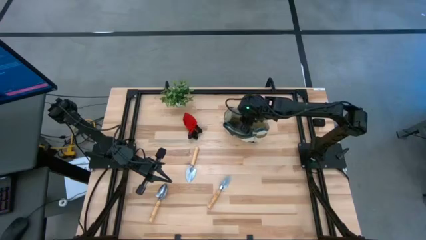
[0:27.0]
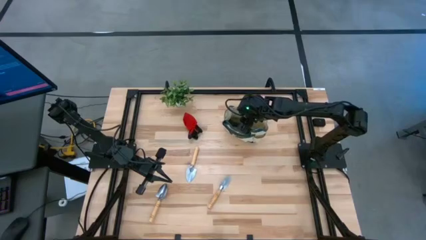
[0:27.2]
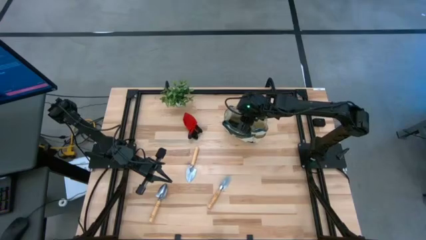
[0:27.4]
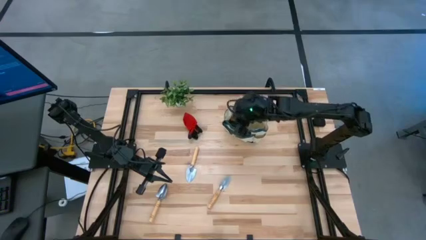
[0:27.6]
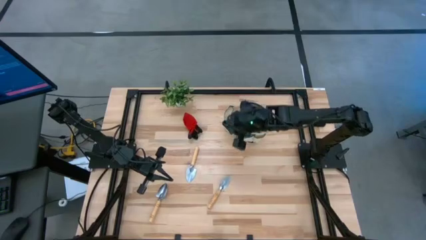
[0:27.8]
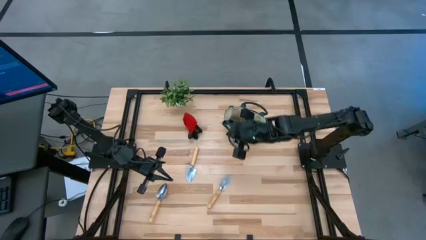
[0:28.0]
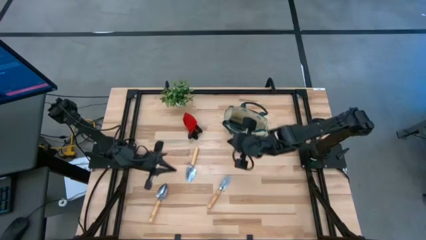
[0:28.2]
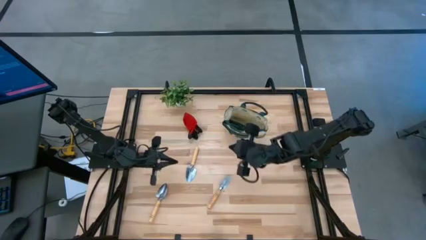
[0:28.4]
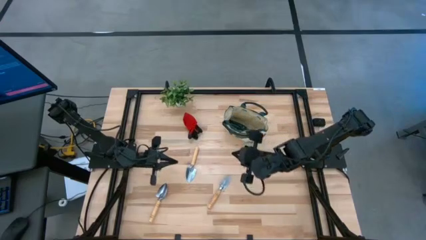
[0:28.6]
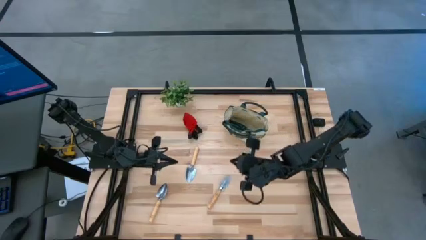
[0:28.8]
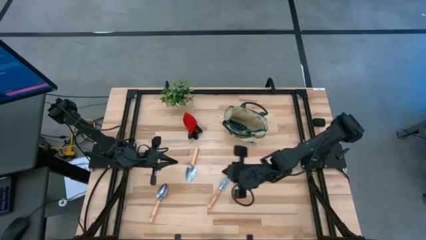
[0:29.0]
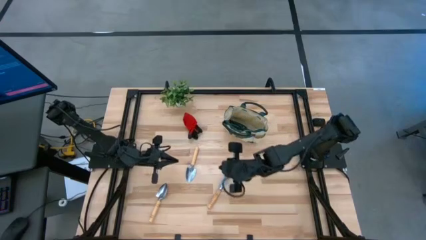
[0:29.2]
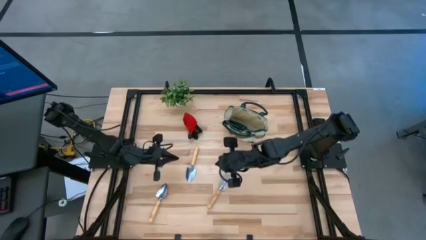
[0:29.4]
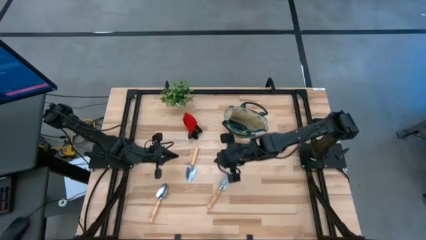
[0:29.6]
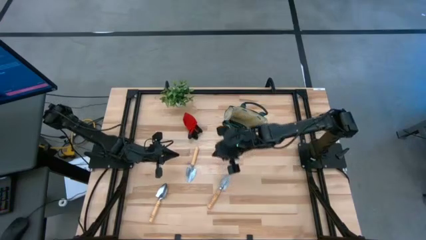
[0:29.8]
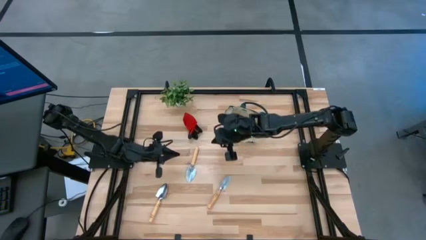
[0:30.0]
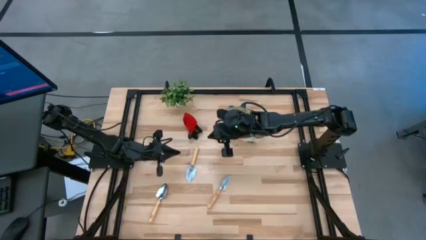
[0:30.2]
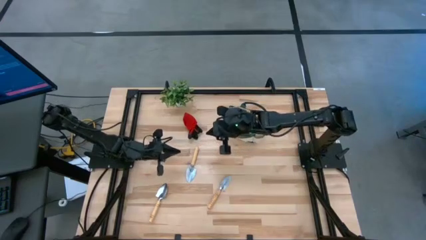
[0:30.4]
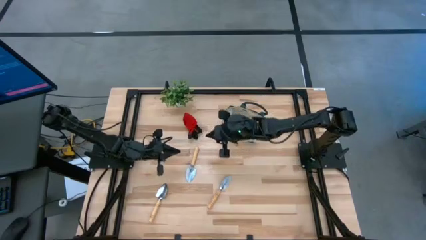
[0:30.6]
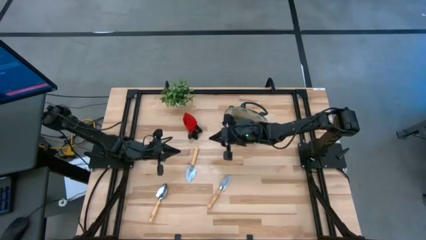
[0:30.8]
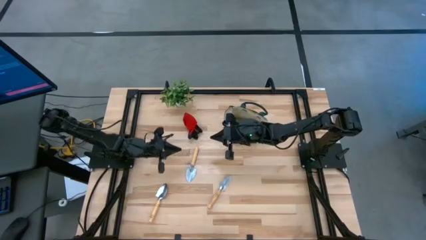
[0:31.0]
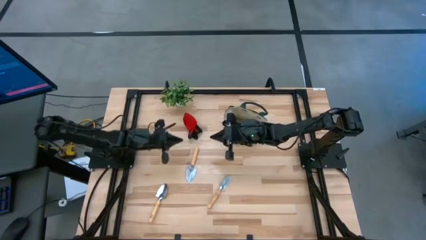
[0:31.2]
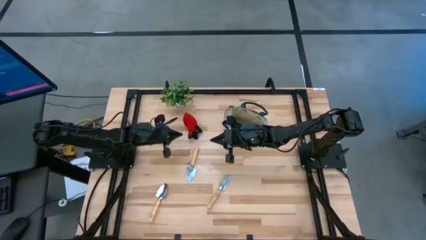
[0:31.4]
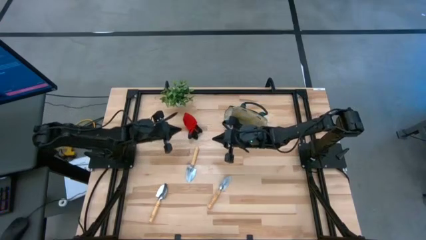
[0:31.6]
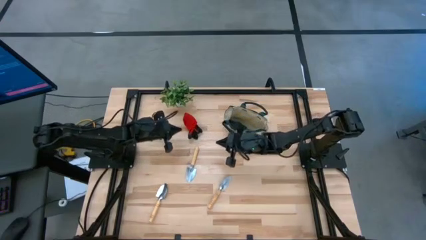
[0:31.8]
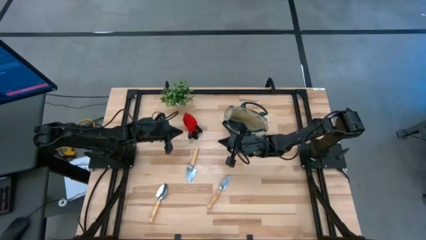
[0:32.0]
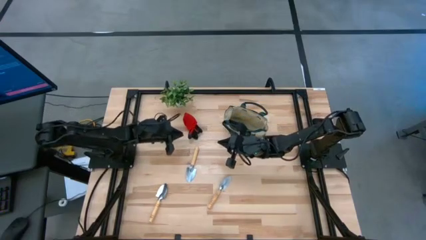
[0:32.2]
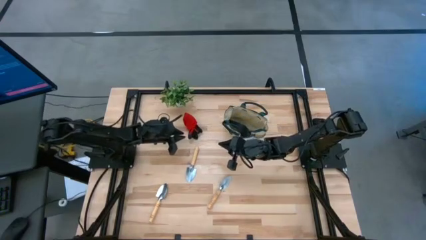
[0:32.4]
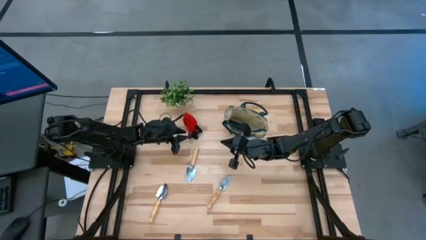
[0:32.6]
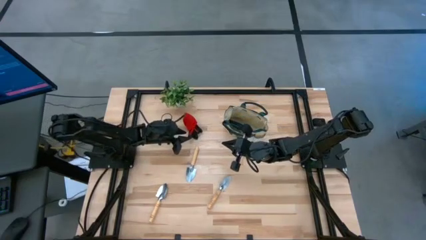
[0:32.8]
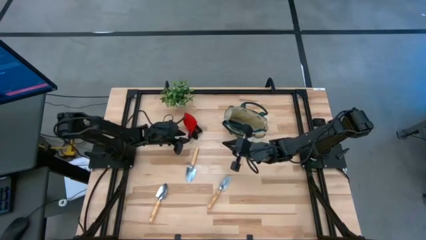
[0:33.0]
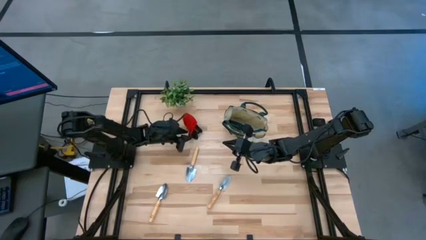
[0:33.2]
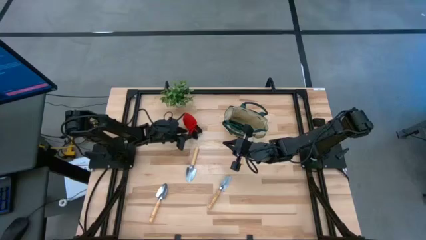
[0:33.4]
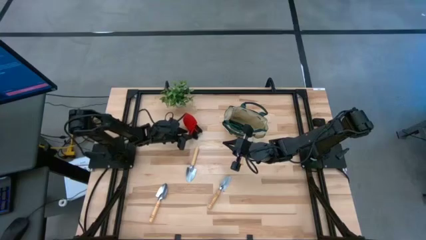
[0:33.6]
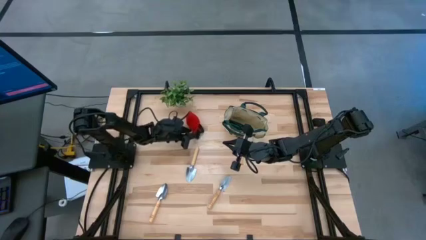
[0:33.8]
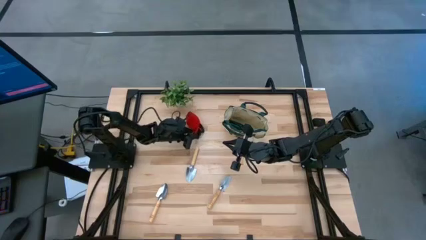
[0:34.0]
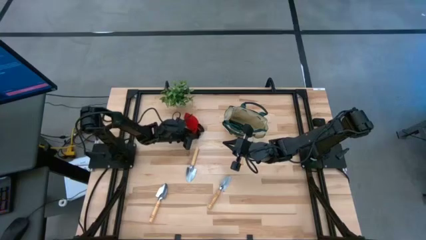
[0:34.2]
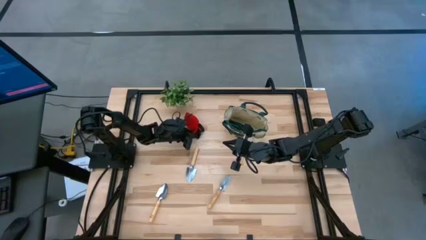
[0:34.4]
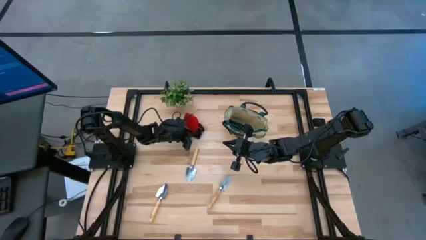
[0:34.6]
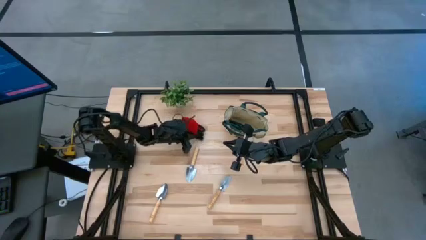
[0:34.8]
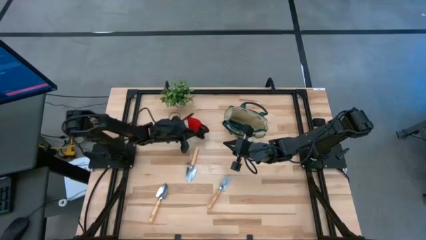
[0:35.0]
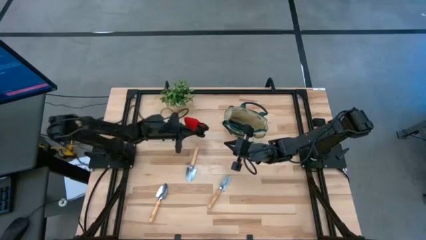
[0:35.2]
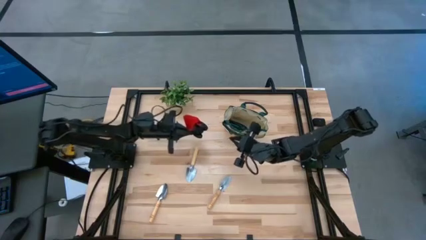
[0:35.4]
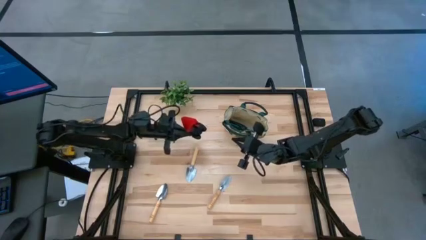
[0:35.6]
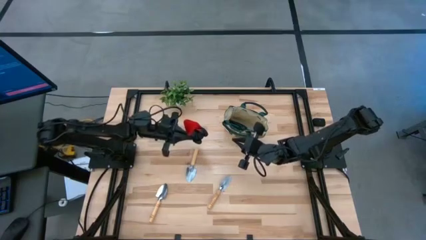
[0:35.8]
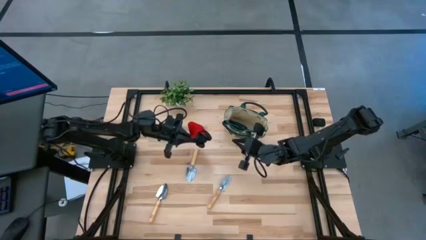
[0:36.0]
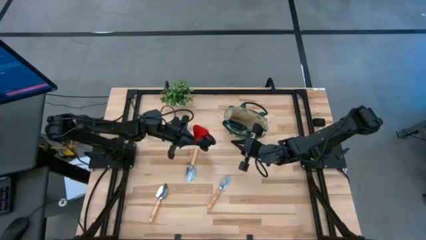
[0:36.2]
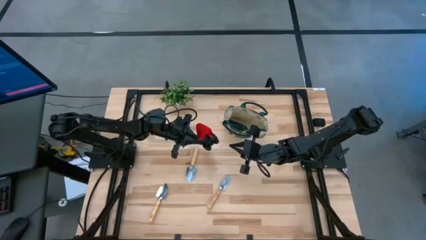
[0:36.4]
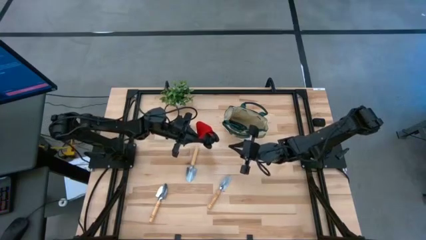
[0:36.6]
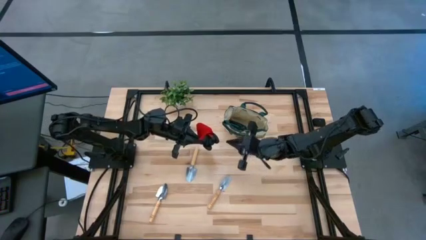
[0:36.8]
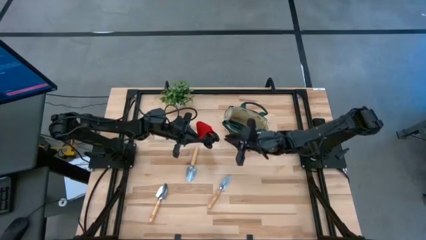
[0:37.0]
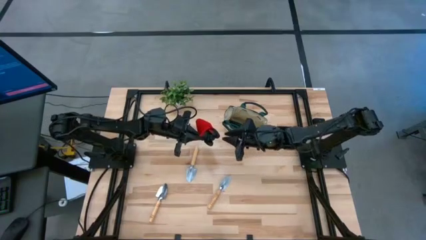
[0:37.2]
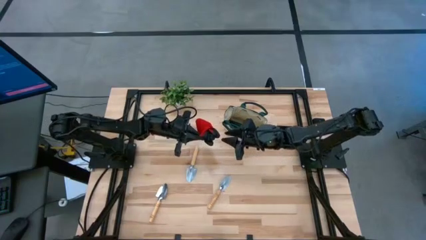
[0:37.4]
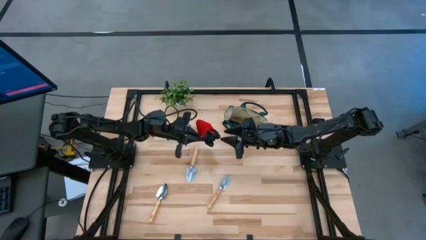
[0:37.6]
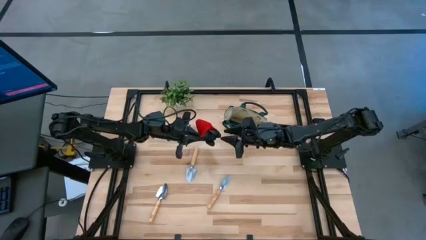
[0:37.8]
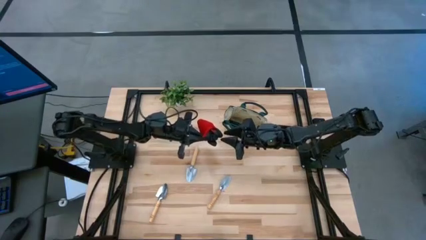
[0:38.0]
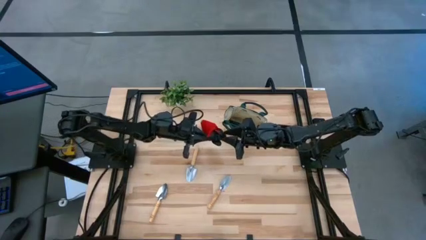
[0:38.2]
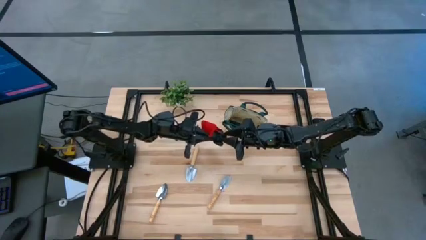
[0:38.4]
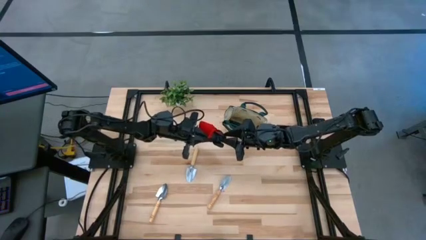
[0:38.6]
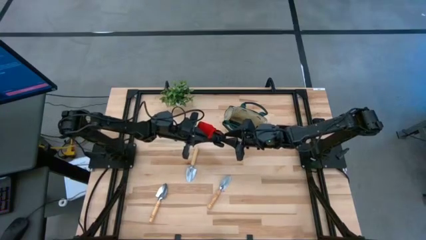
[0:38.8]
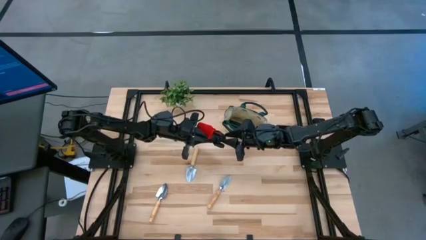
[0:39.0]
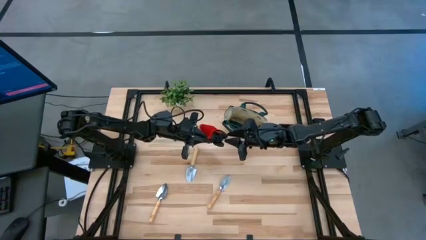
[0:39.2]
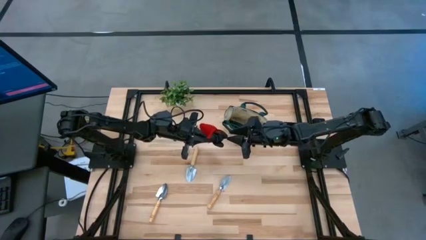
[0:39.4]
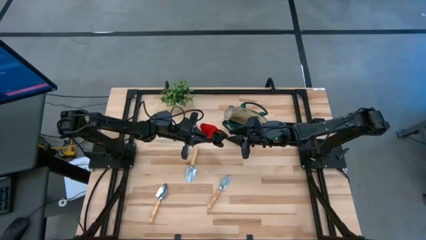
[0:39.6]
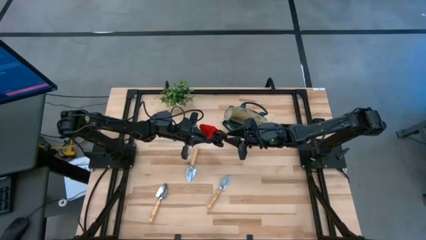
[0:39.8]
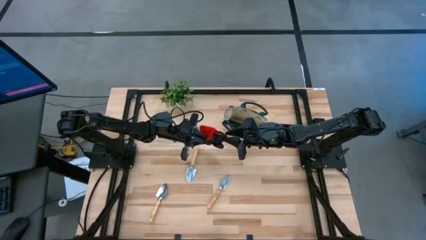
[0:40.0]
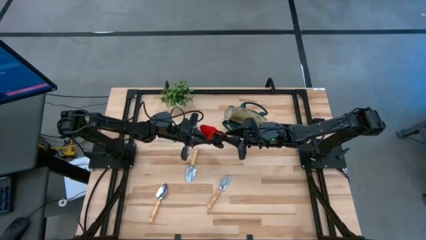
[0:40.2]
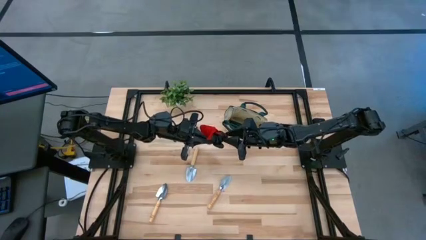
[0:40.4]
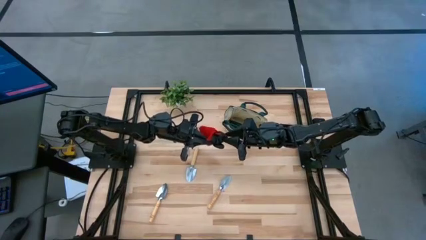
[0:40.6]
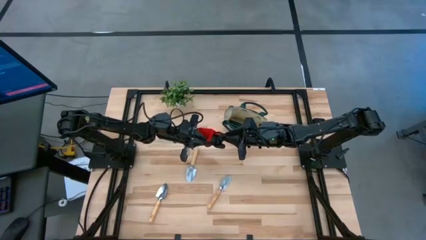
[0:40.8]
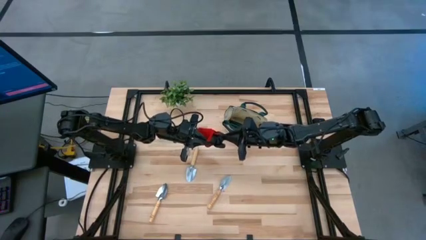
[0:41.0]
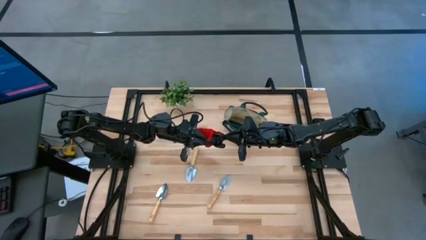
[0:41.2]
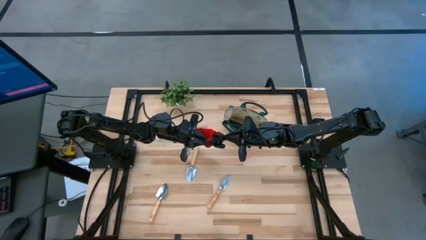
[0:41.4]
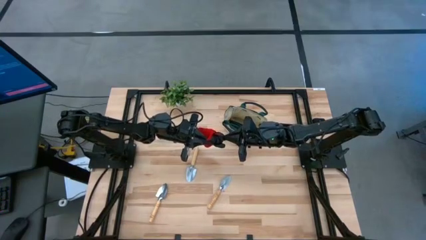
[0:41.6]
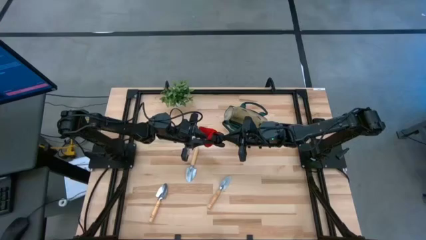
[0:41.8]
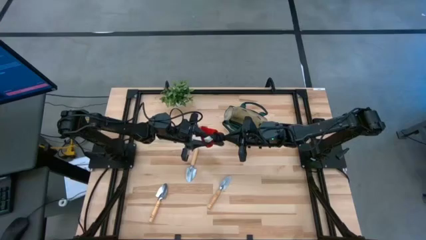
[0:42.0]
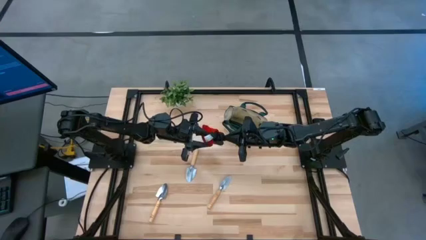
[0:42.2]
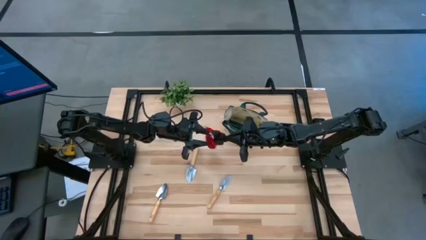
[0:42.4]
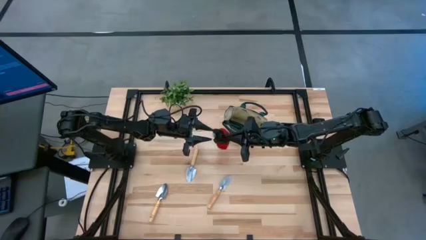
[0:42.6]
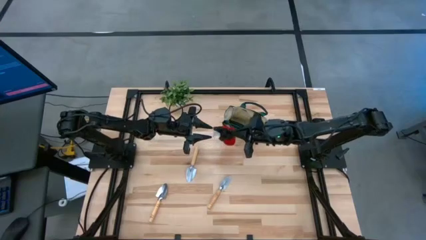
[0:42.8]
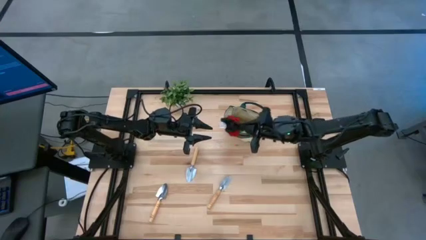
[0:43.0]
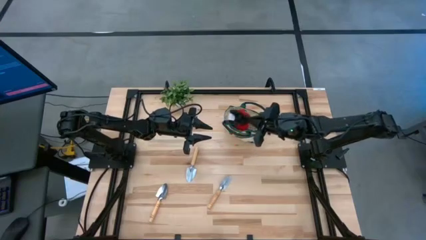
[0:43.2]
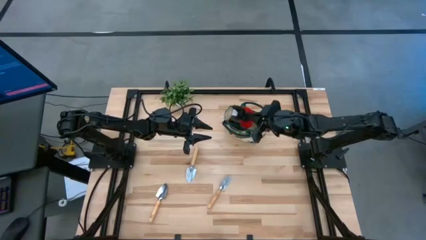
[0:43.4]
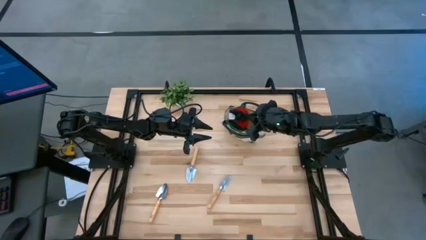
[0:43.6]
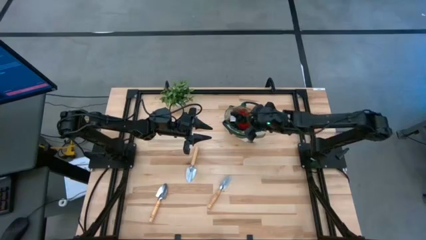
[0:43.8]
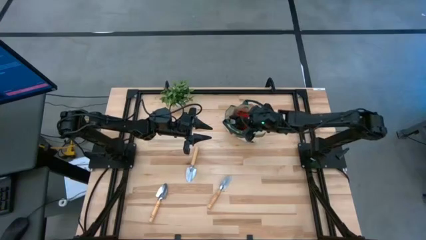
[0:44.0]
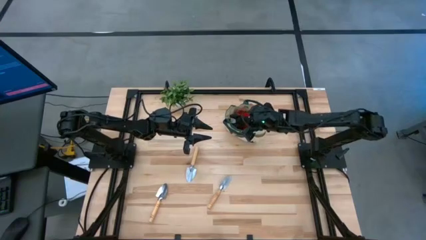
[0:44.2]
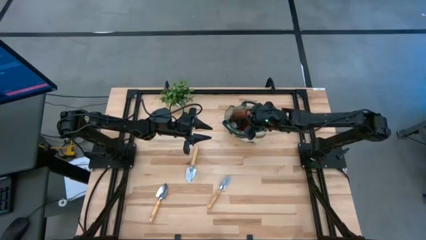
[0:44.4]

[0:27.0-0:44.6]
Task: Pick & Place Garden tools in Gardening bag
Put the red glove into the gardening bag
